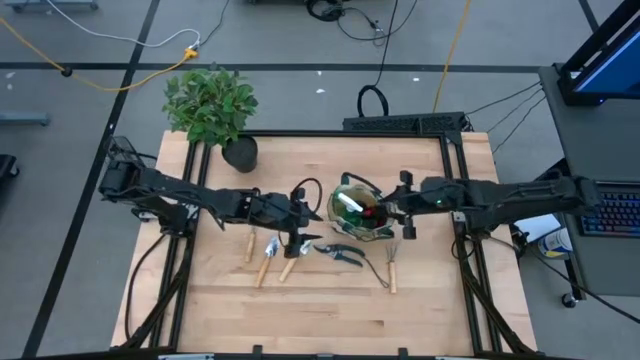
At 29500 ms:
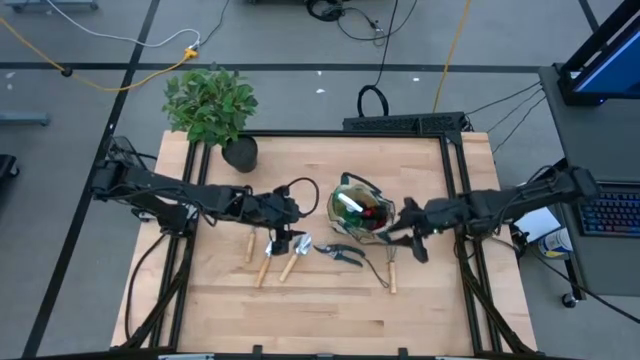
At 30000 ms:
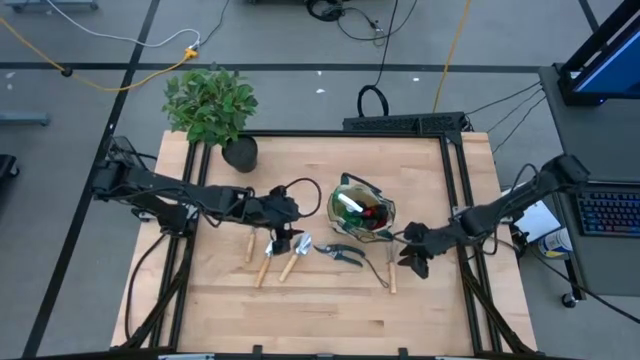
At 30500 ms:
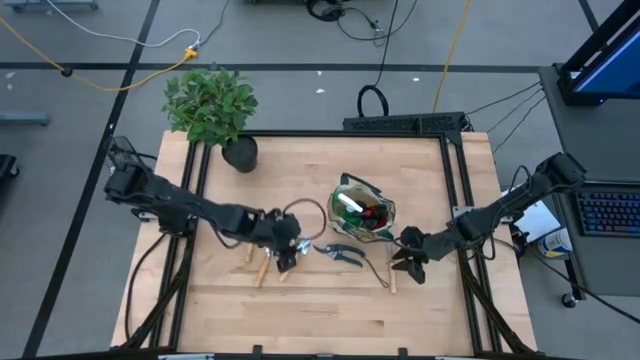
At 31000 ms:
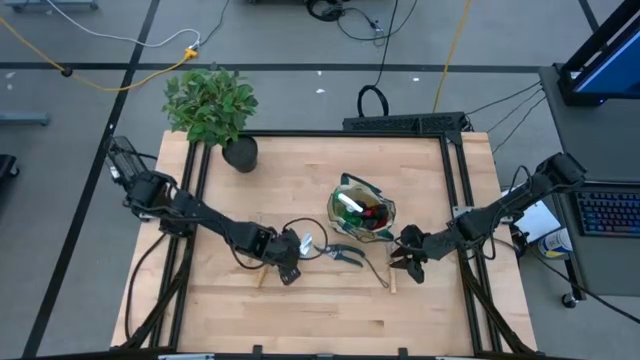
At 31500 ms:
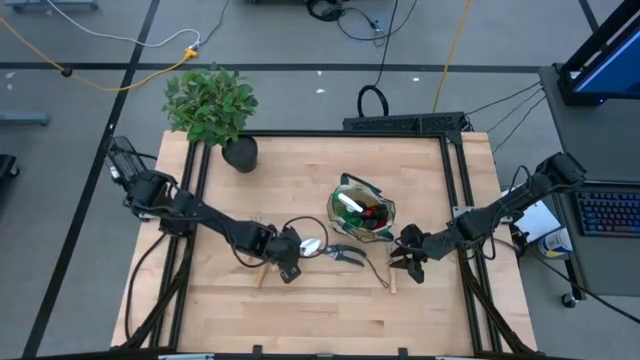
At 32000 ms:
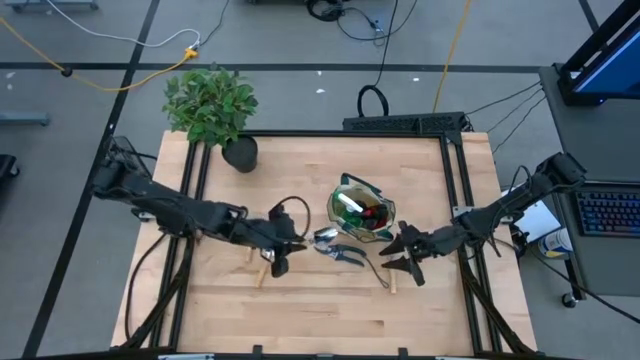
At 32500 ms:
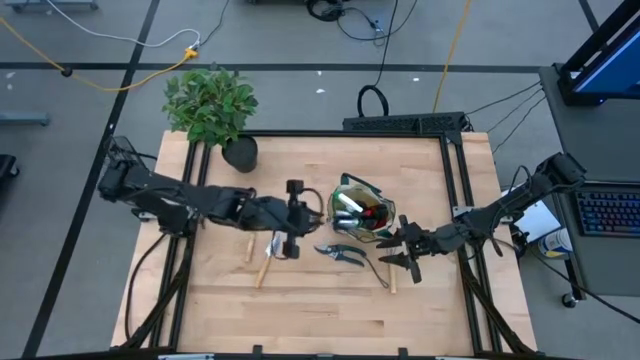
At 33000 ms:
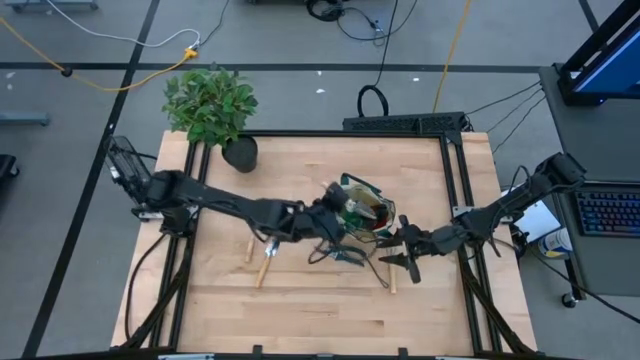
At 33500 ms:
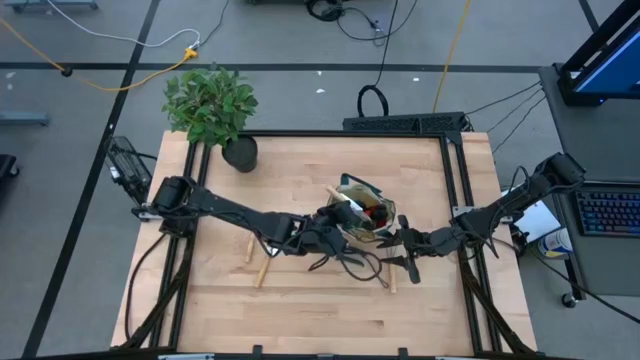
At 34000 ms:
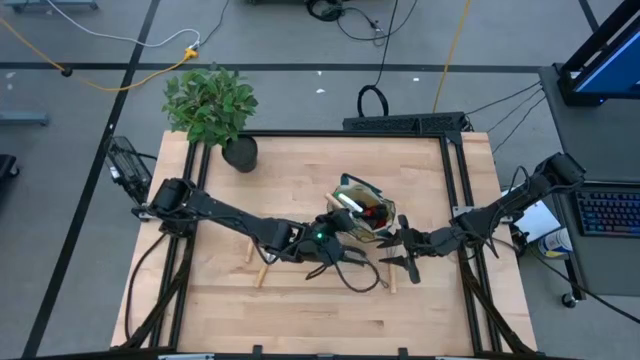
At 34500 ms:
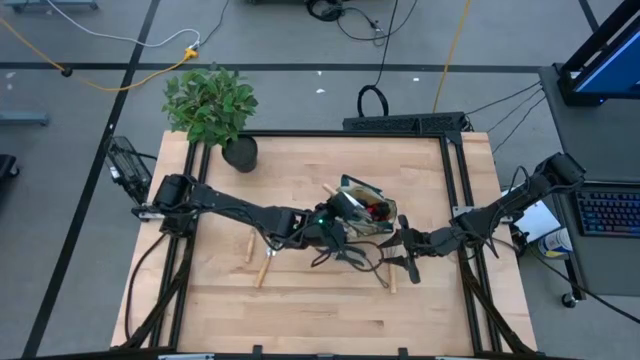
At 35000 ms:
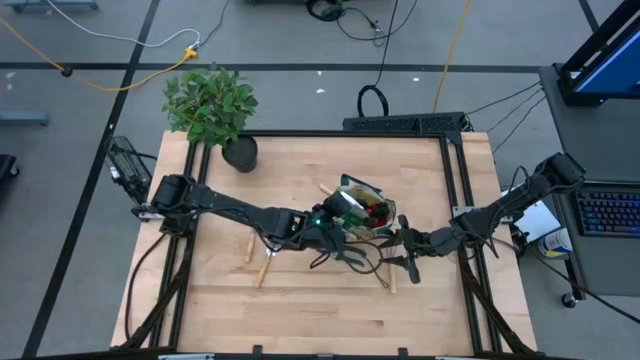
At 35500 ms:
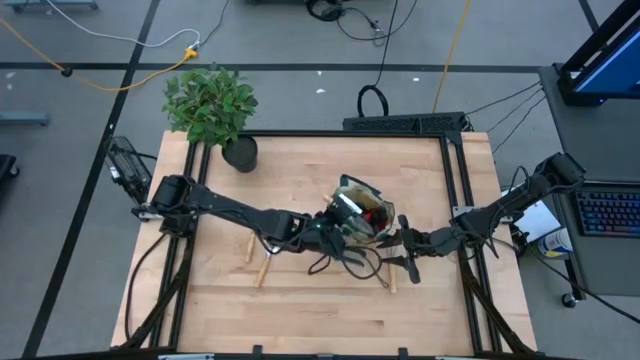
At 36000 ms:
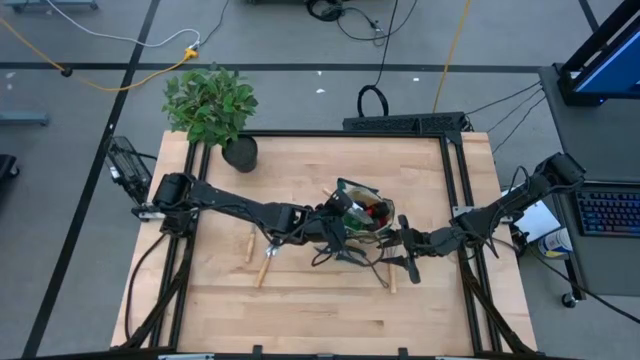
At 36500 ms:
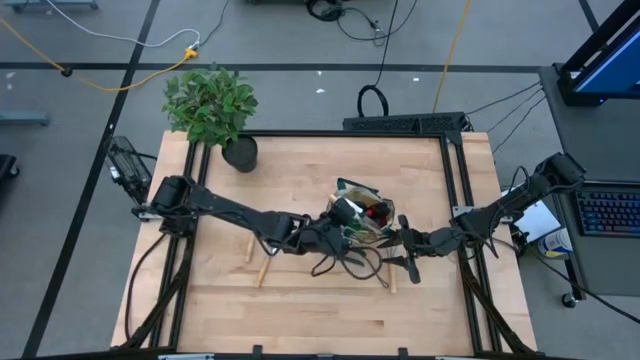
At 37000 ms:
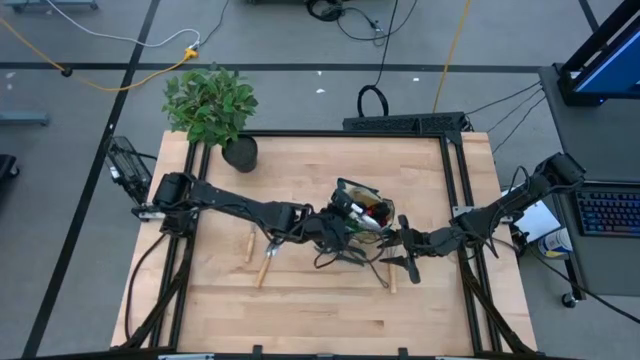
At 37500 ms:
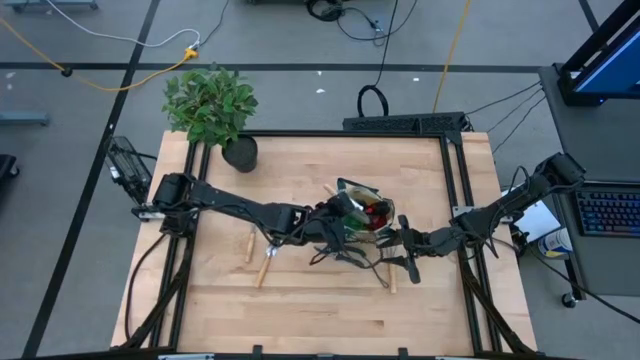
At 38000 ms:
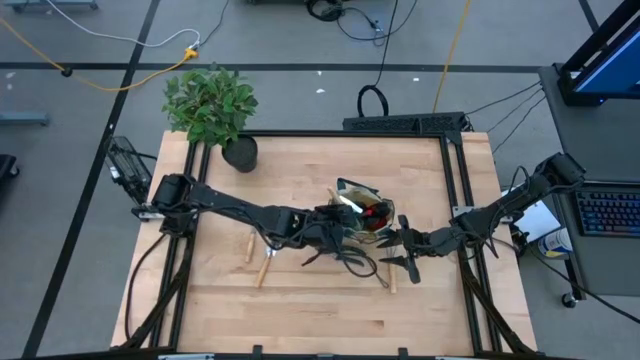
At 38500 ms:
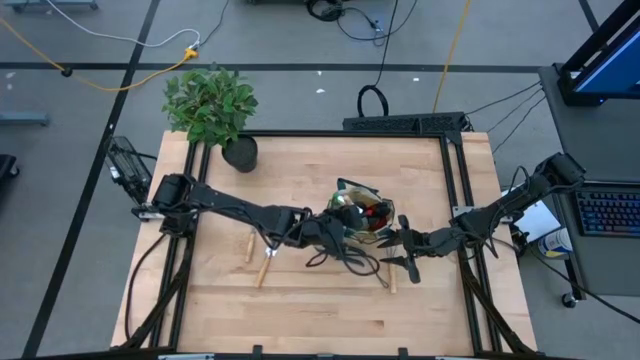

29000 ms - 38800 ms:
Task: Pick & Place Garden tools in Gardening bag
Put the right trowel into the gardening bag

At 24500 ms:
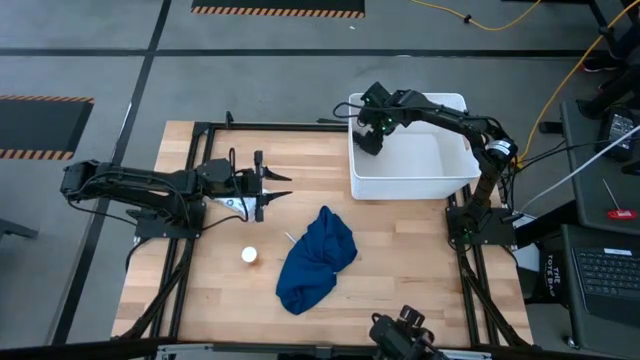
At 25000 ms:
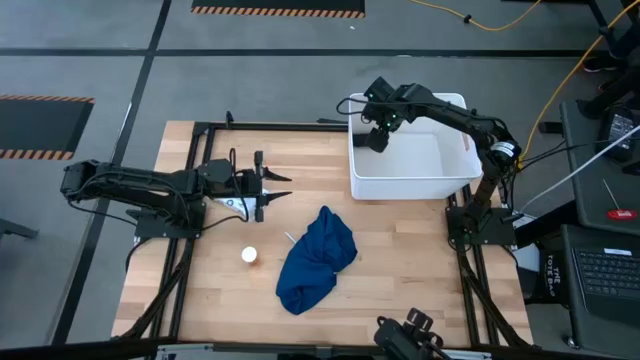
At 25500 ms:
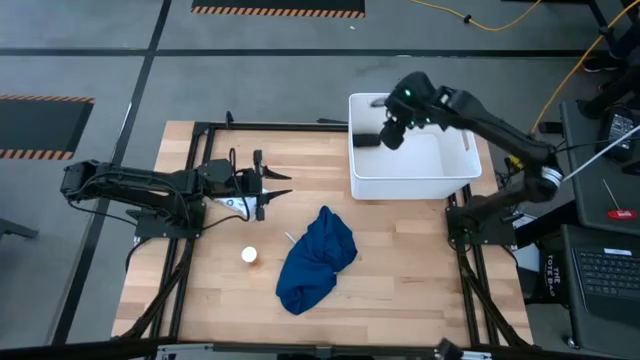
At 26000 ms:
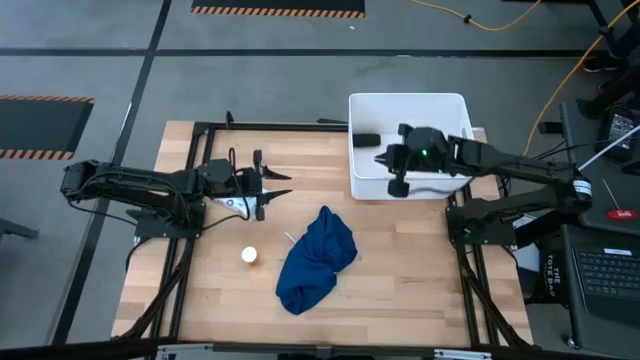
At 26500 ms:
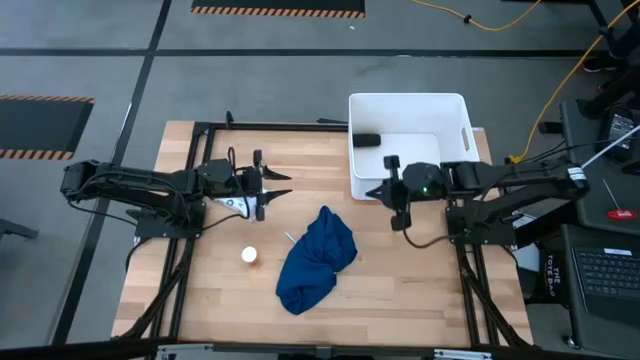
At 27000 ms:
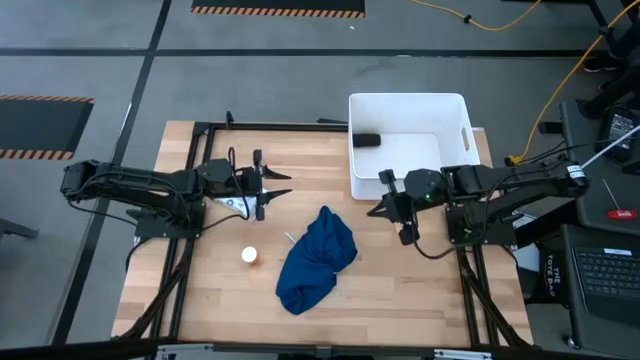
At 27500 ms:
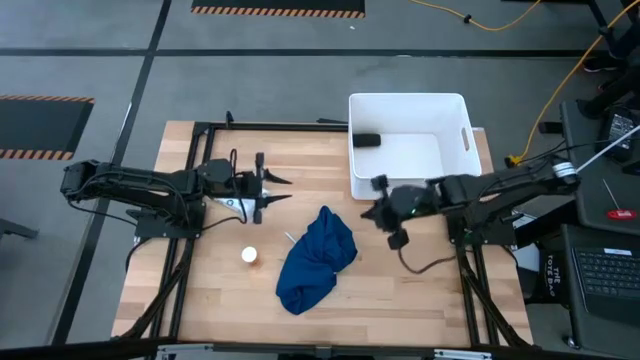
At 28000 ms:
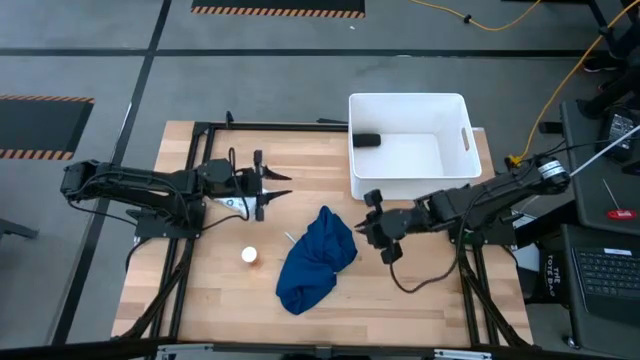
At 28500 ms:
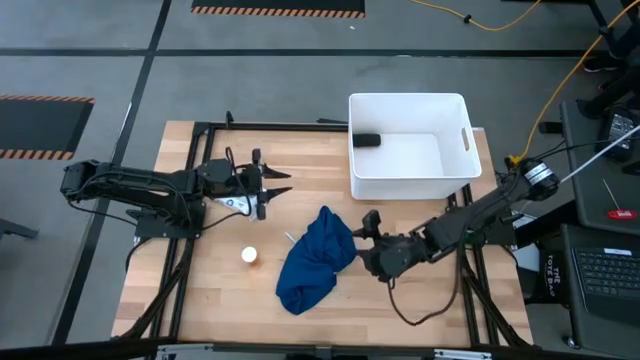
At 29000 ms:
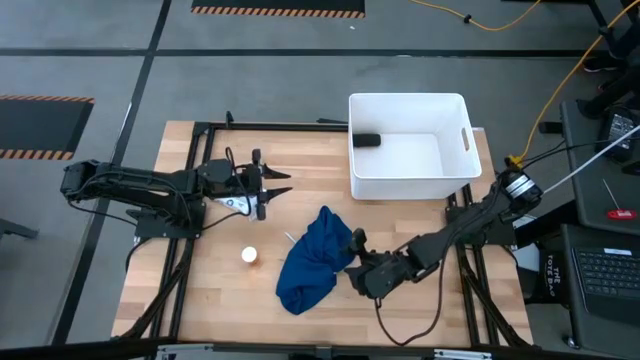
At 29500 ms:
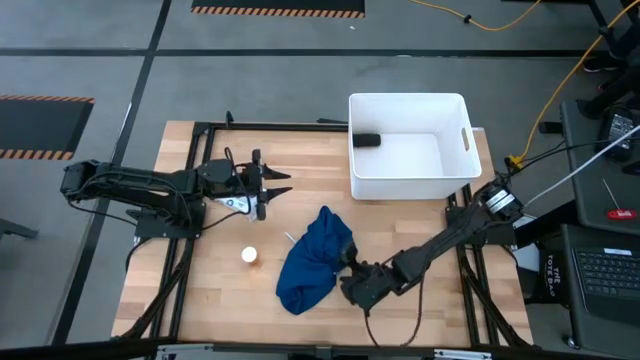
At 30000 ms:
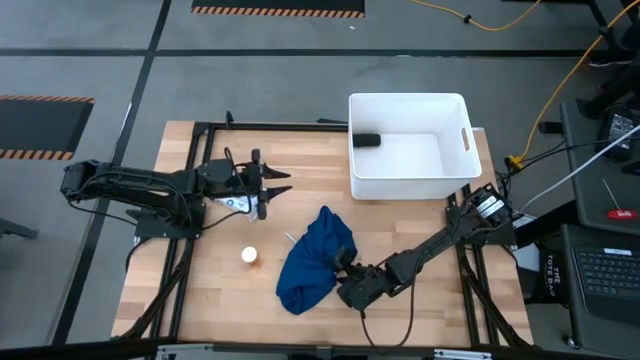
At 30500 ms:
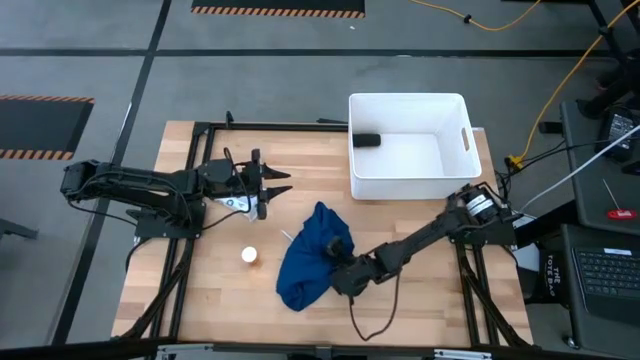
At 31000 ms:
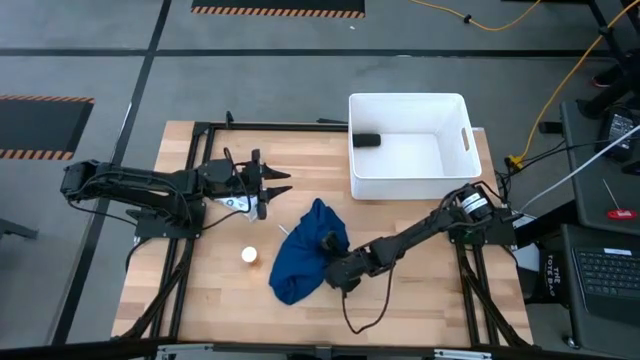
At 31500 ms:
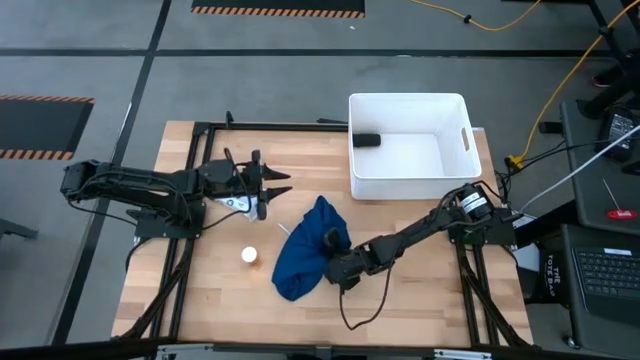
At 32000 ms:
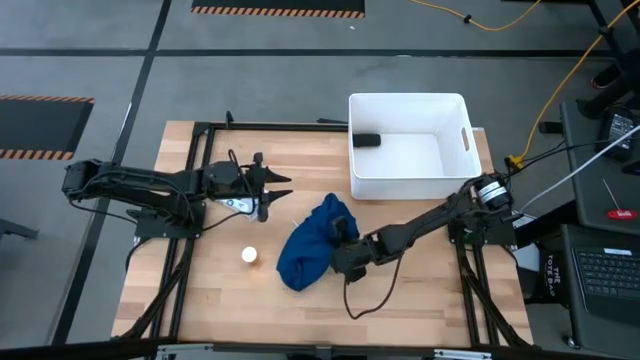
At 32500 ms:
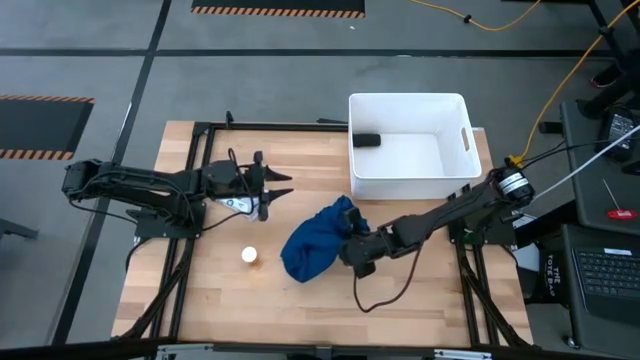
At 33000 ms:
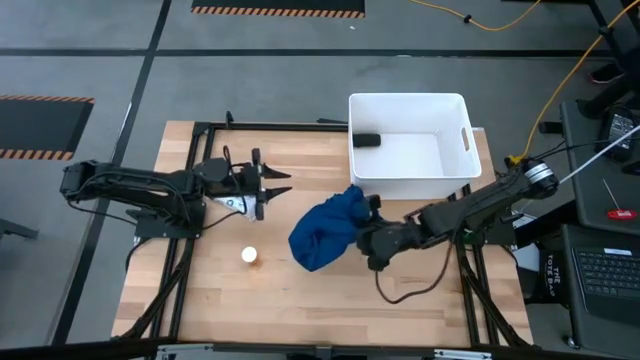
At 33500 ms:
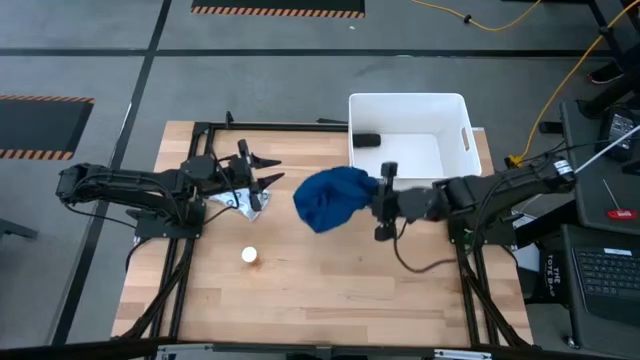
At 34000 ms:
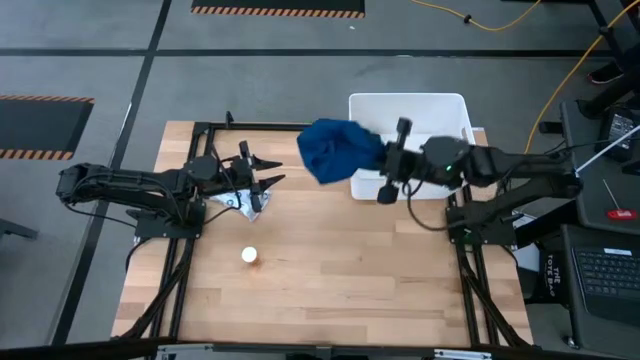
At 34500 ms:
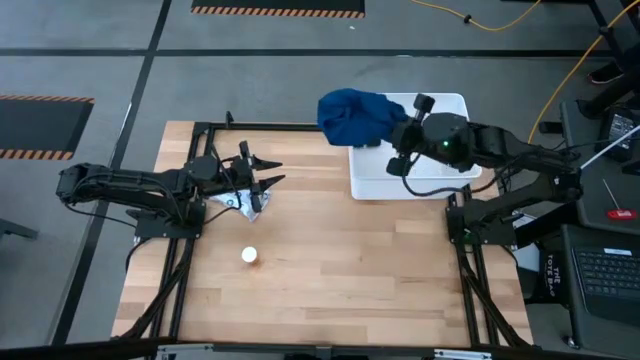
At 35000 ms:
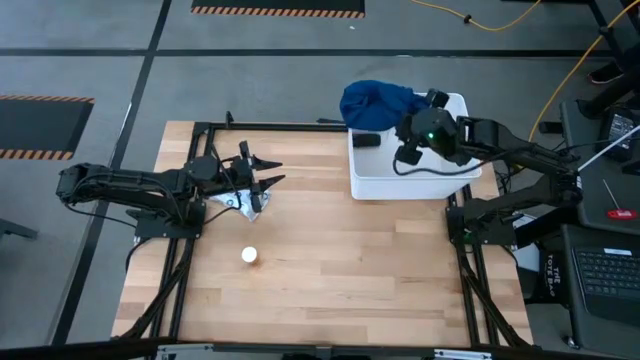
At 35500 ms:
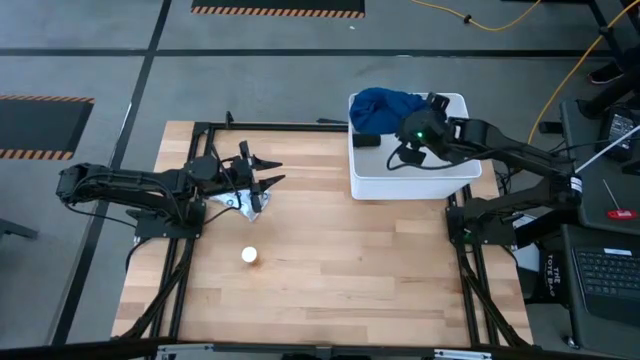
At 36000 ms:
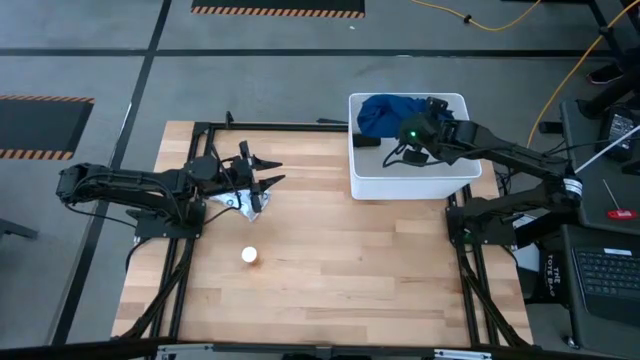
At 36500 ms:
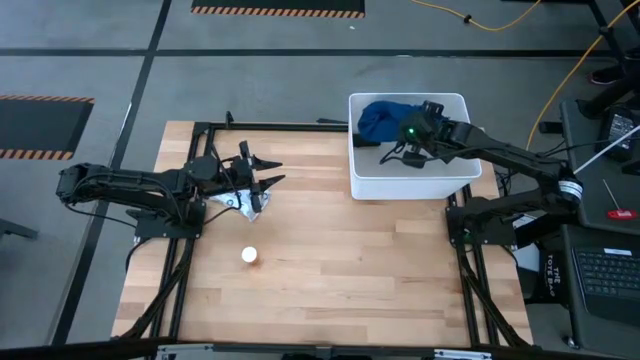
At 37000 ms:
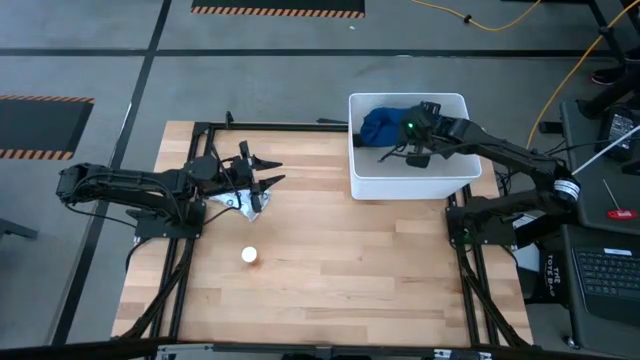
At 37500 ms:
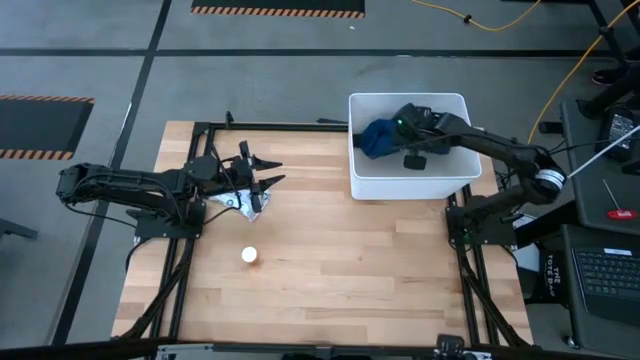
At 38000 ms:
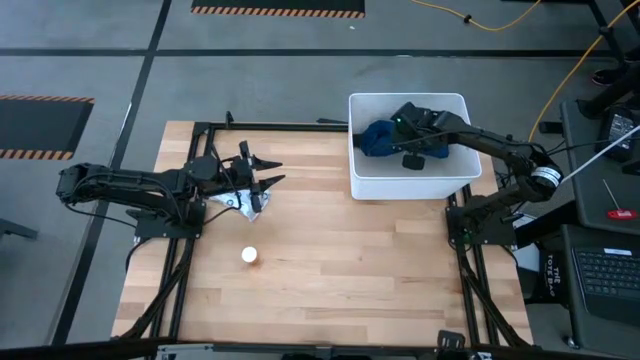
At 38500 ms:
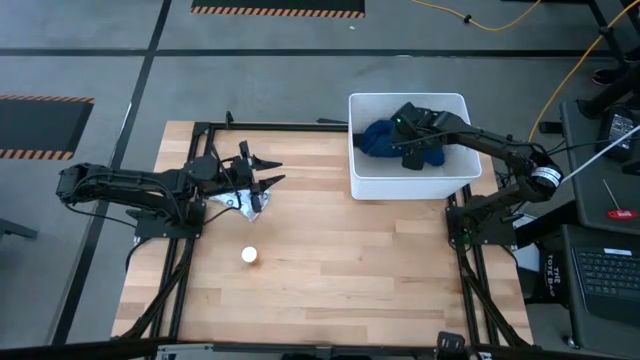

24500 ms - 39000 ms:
Task: Pick & place medical supplies in basket/bin
Put the blue patient gown into the white container
